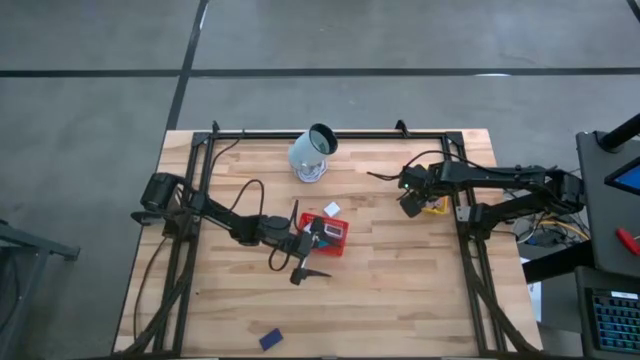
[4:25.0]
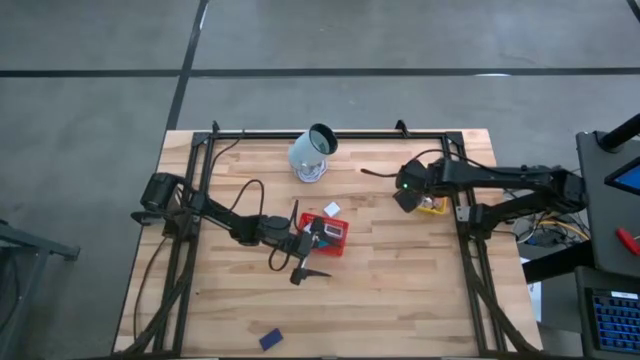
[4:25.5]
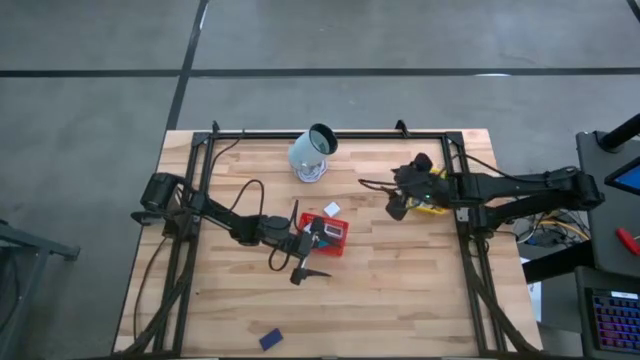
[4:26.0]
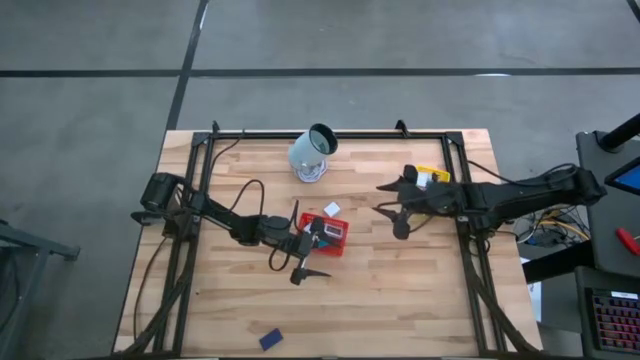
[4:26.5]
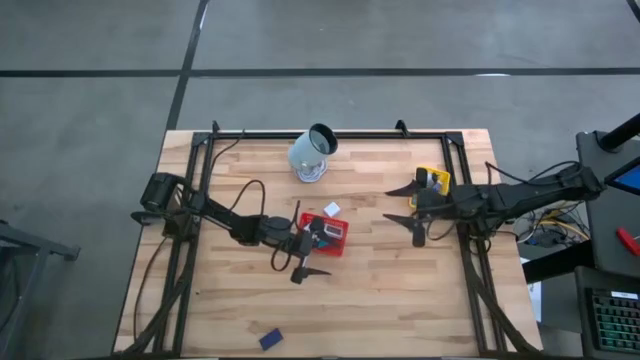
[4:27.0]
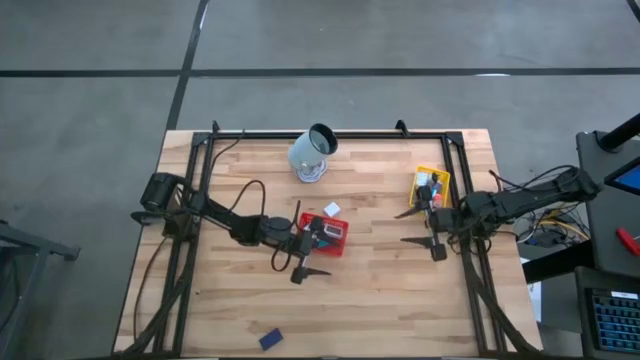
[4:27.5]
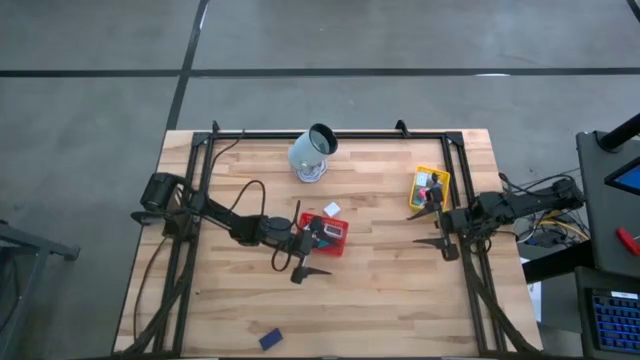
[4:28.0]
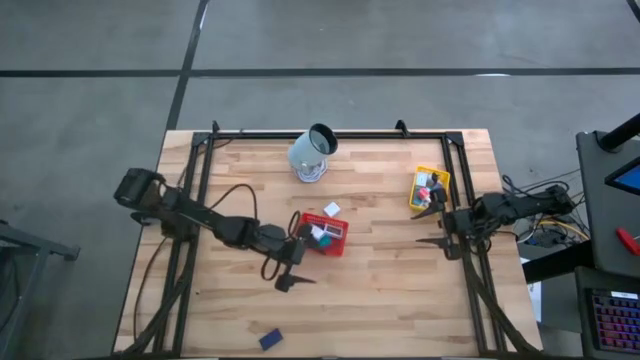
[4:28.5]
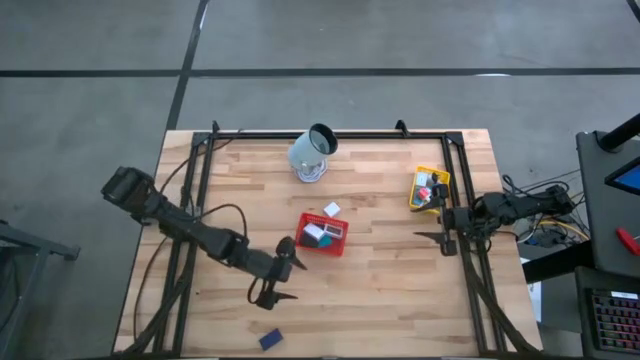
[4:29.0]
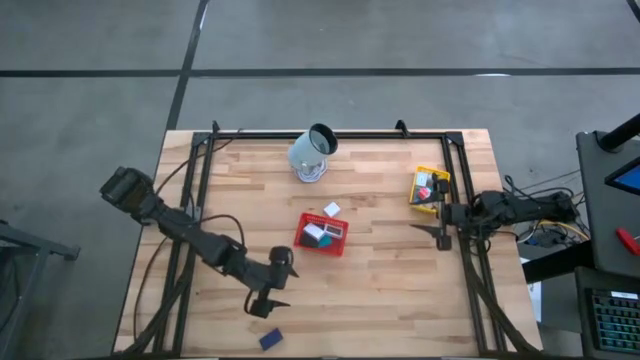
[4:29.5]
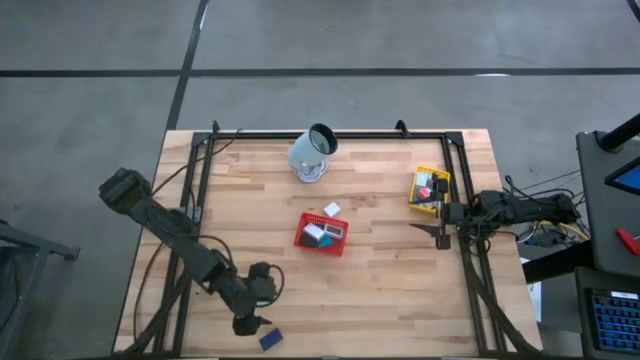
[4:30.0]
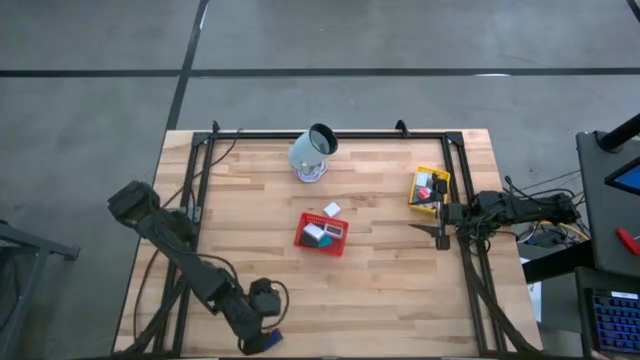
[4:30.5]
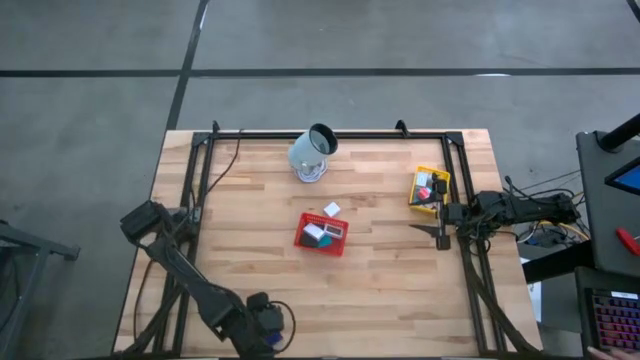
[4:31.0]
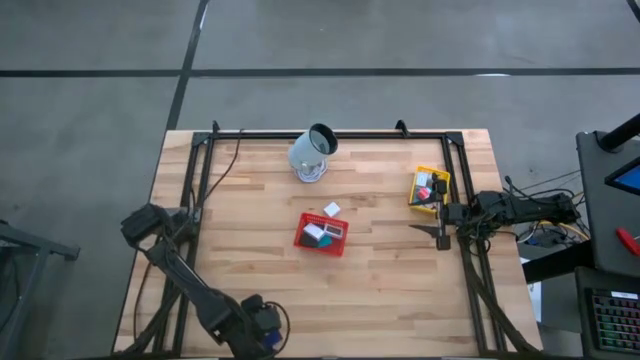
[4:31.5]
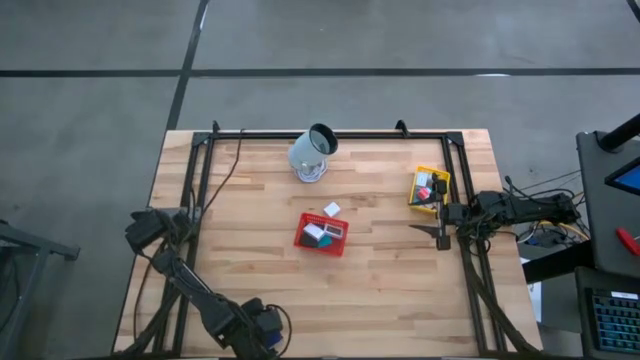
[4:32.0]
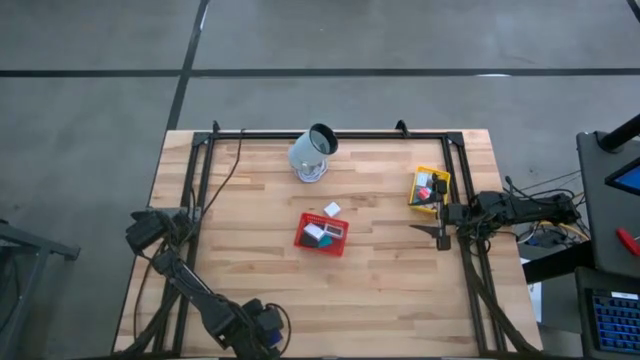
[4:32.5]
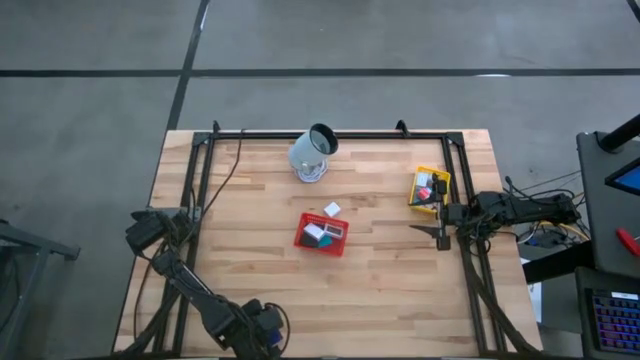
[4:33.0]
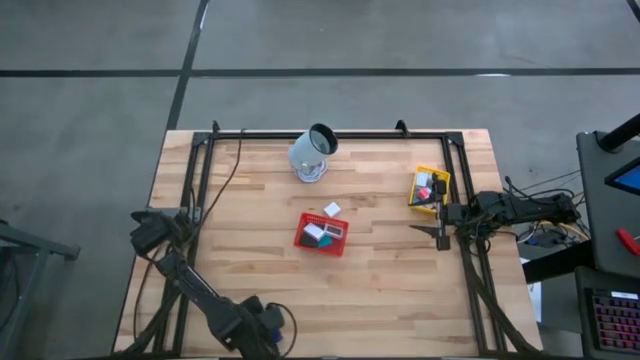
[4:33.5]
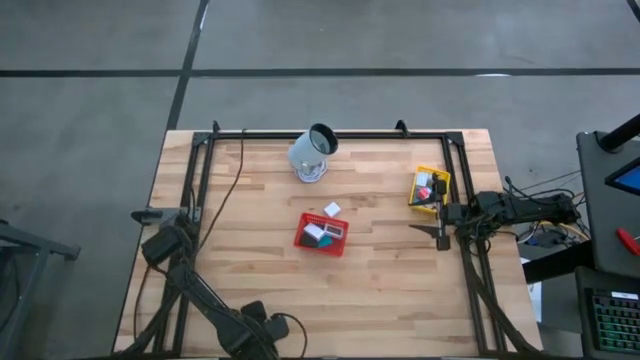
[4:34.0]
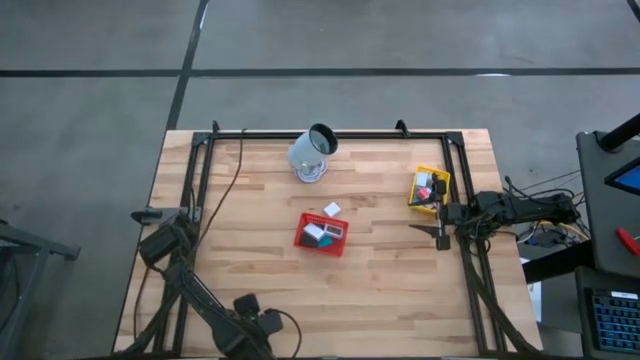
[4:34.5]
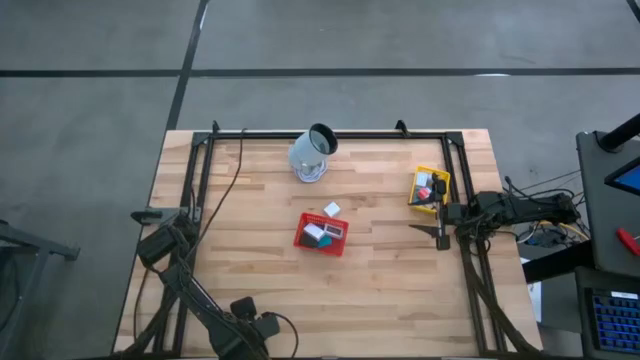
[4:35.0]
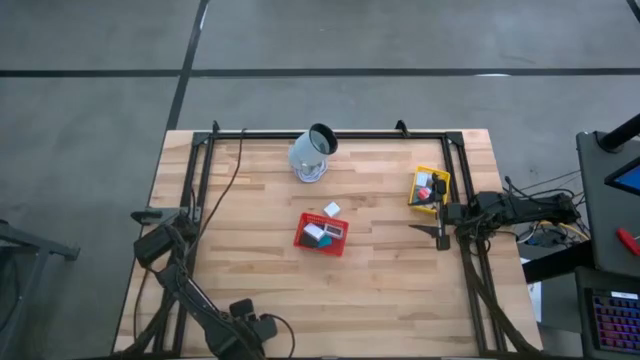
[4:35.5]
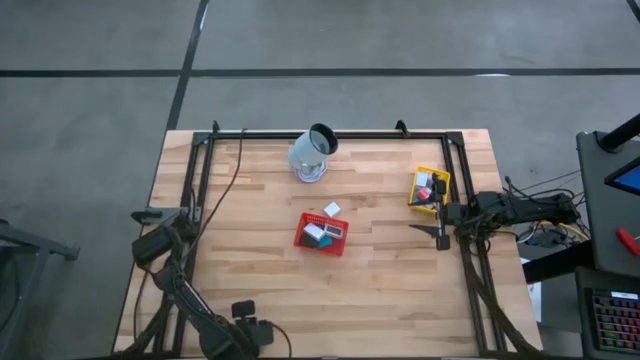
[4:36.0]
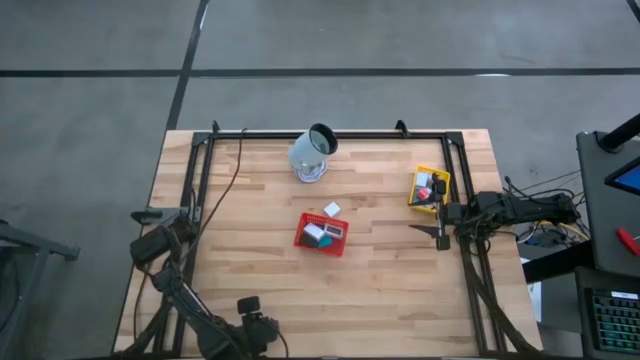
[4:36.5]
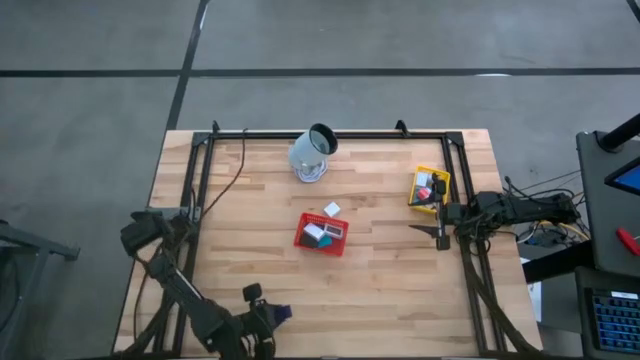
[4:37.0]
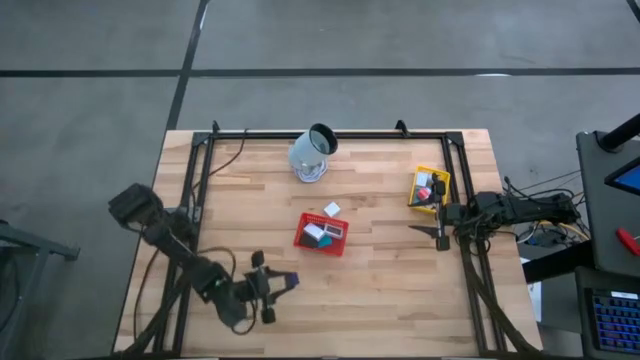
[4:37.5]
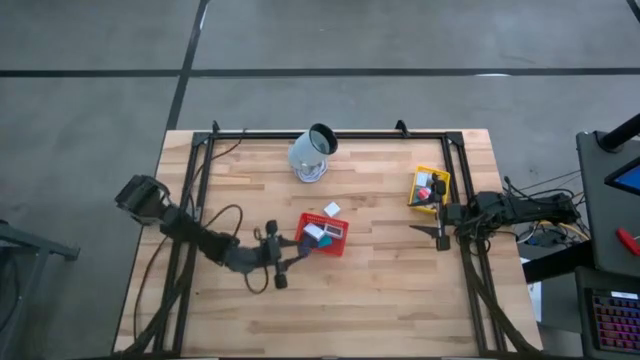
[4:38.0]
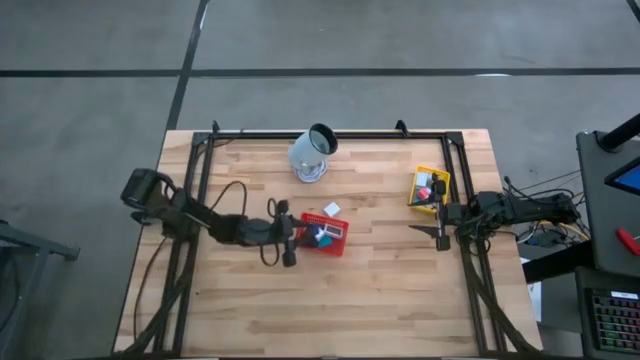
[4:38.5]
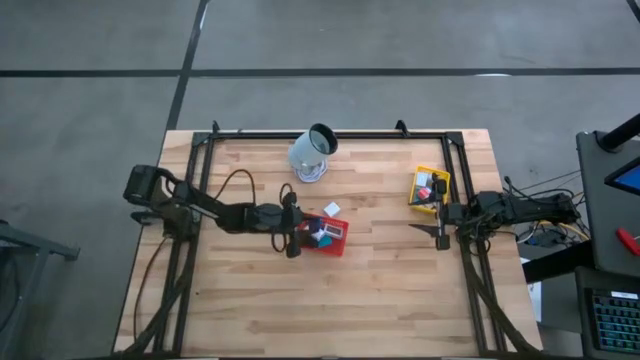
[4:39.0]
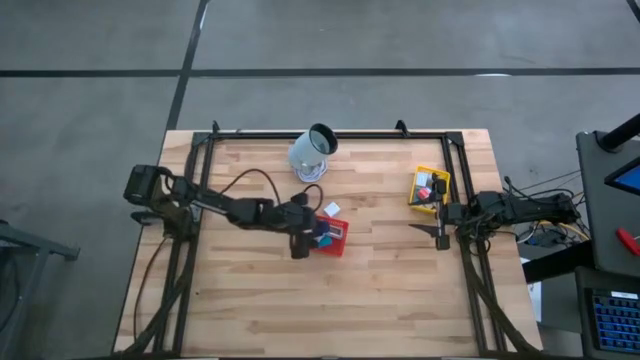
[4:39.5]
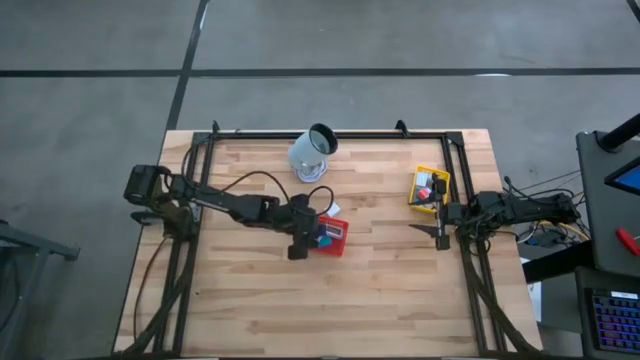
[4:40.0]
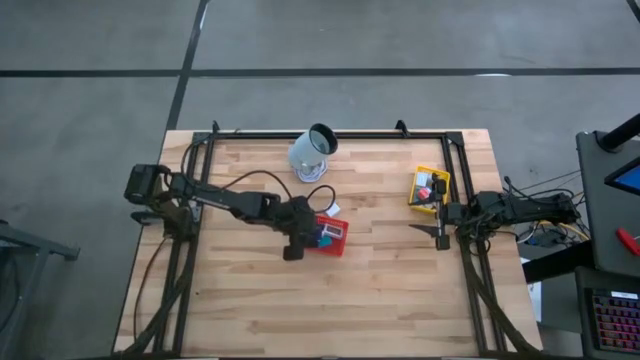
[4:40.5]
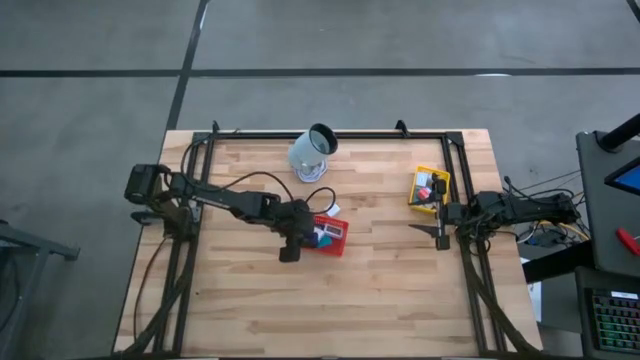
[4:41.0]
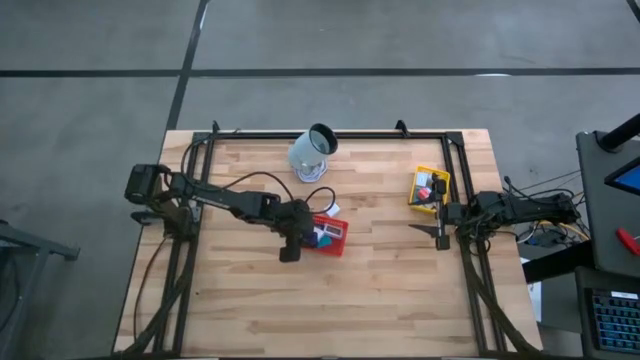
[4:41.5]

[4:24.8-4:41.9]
Task: Pick & Place Office items
Put the blue digital clock into the red basket

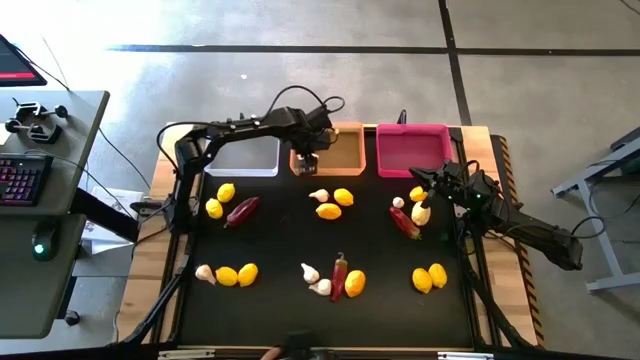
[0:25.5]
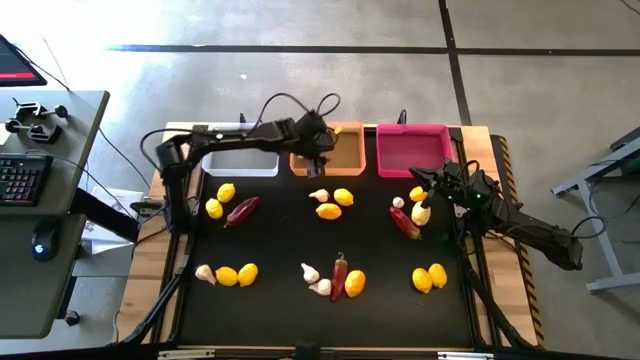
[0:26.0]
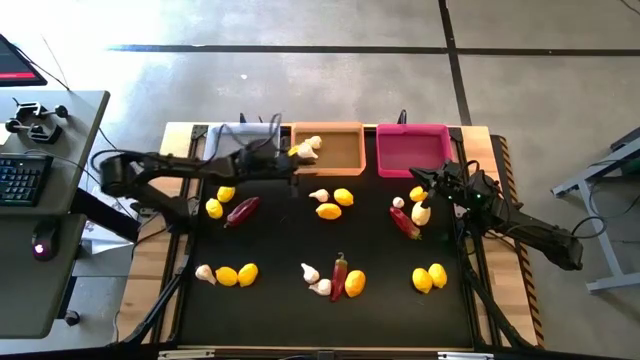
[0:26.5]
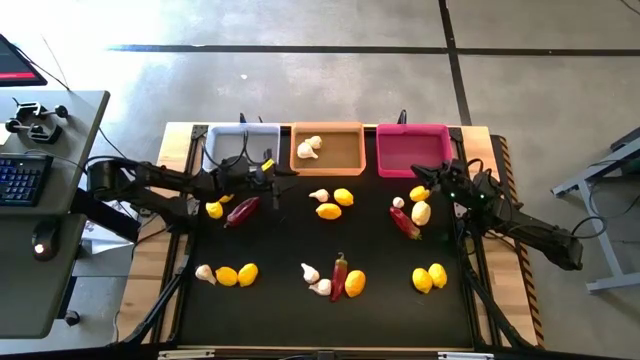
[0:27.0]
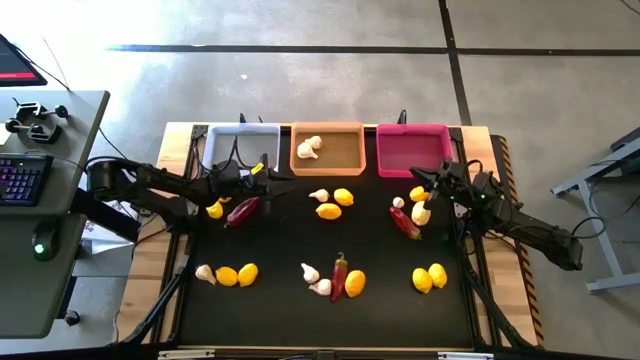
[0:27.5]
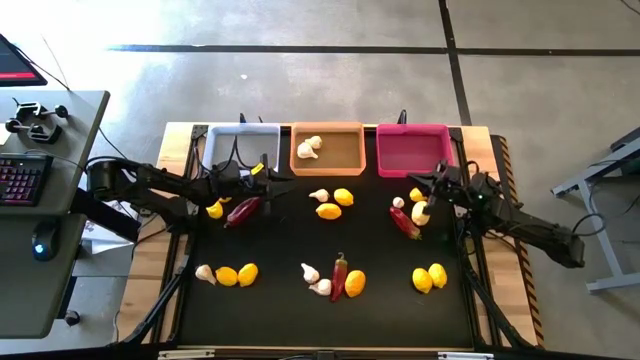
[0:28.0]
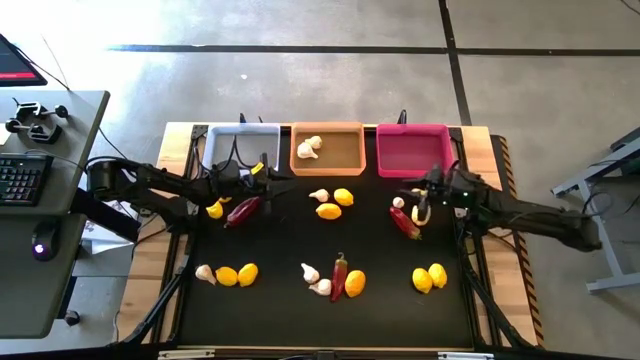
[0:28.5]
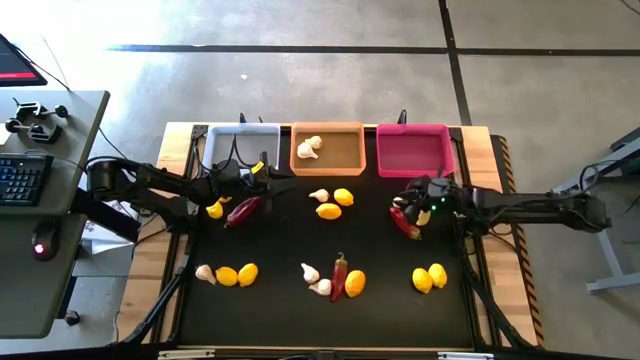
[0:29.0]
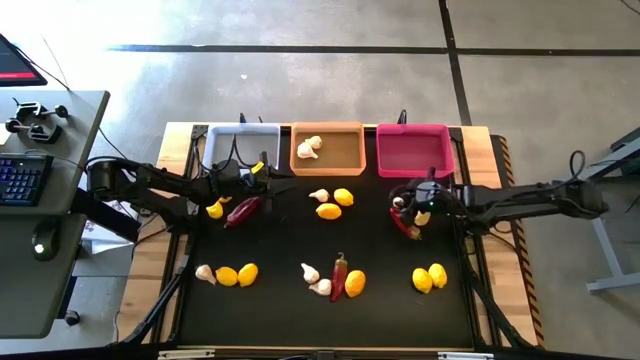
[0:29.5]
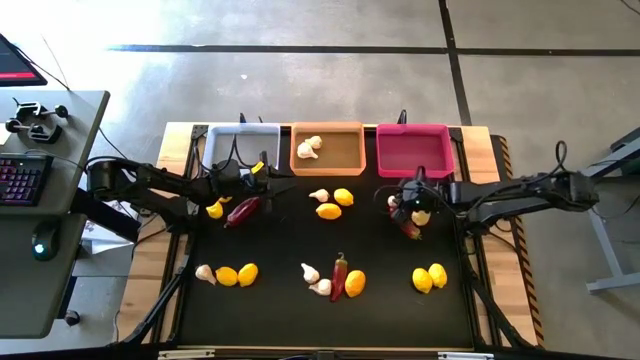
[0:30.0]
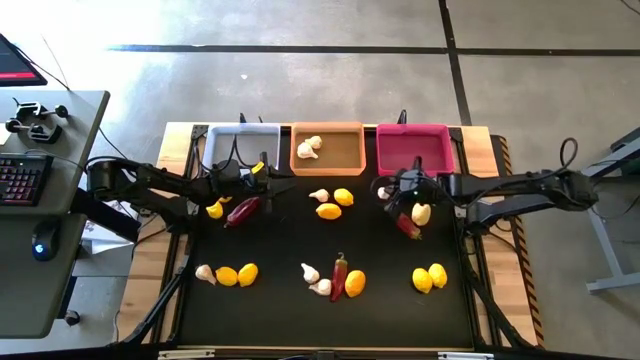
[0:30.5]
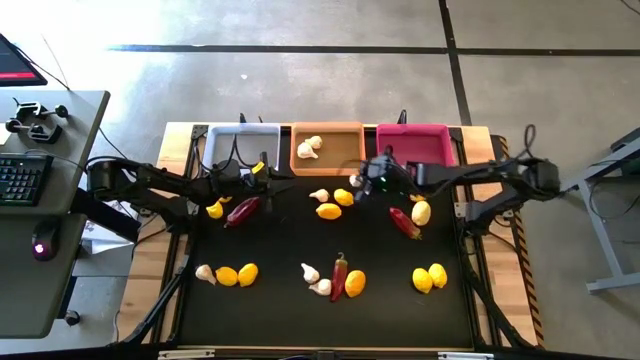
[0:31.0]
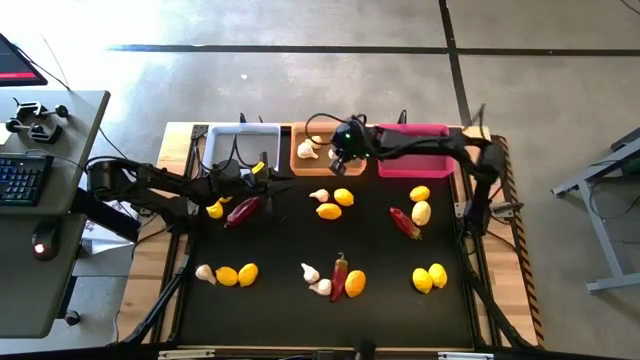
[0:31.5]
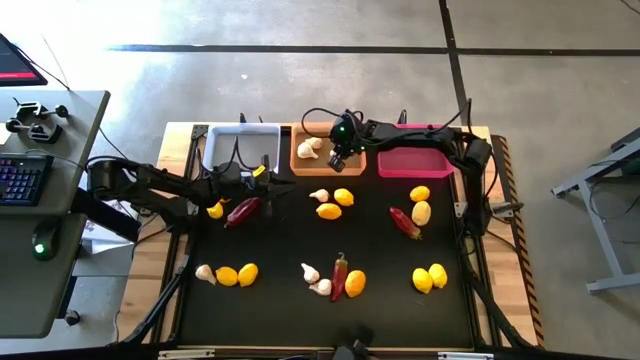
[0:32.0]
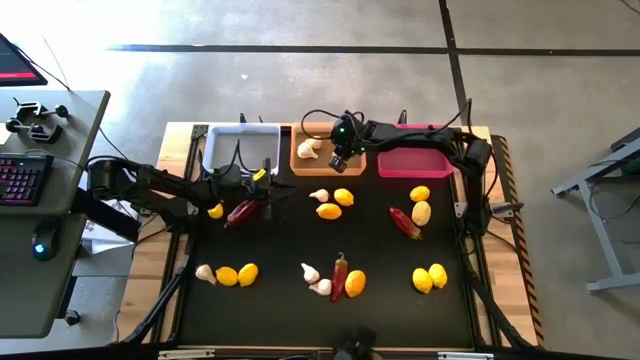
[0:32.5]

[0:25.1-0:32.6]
Task: Sort produce into baskets
Put the white garlic into the orange bin
